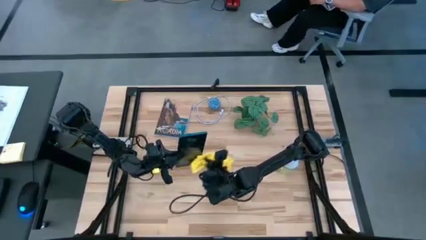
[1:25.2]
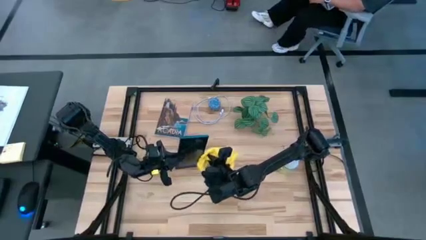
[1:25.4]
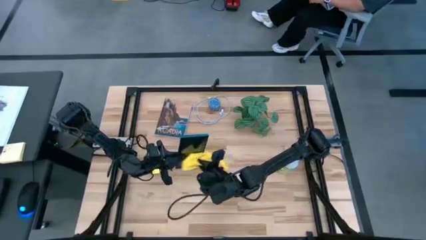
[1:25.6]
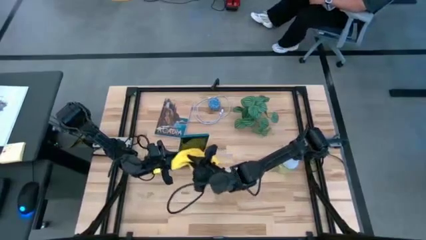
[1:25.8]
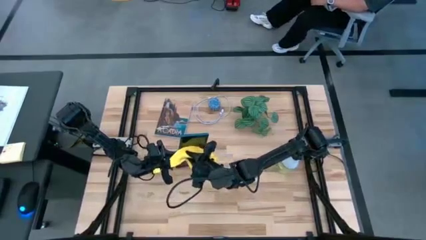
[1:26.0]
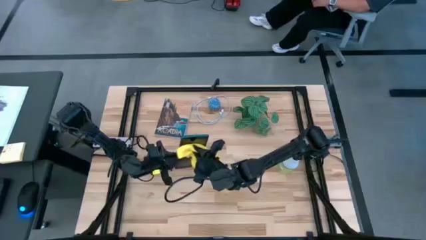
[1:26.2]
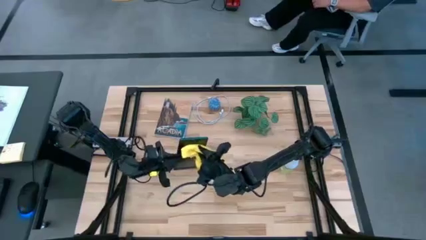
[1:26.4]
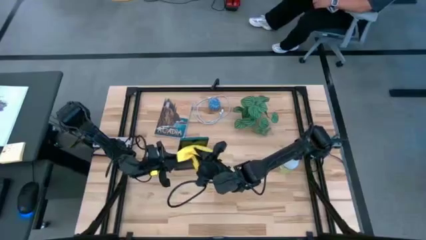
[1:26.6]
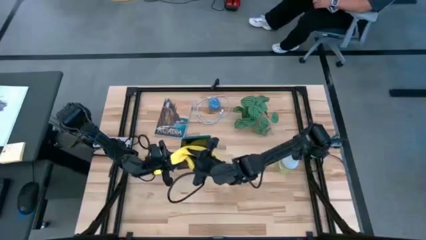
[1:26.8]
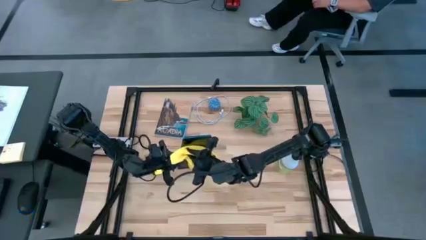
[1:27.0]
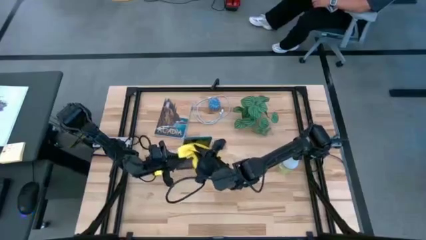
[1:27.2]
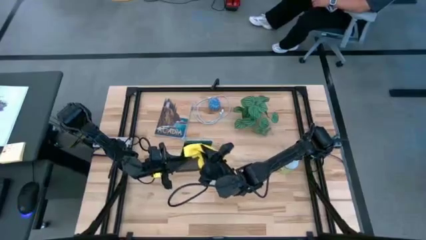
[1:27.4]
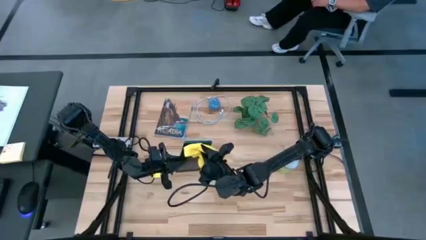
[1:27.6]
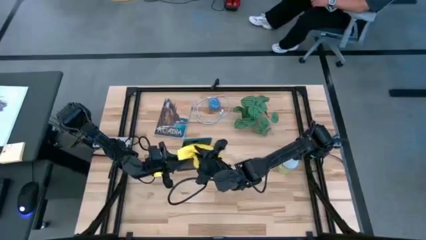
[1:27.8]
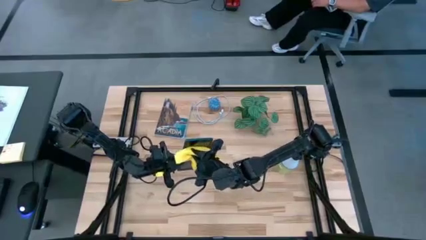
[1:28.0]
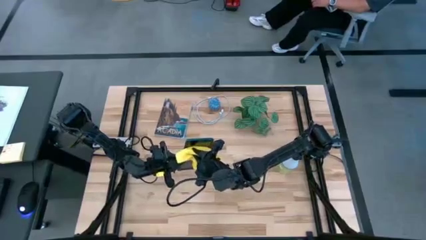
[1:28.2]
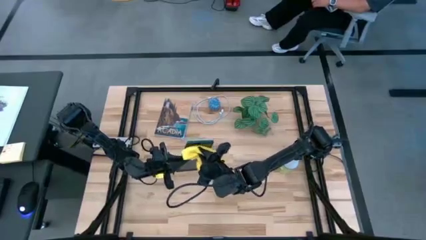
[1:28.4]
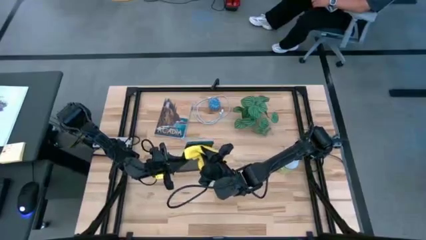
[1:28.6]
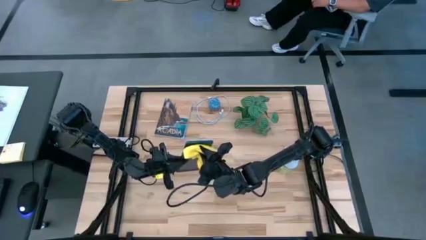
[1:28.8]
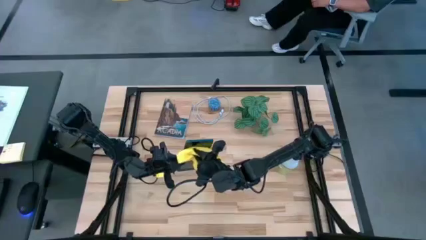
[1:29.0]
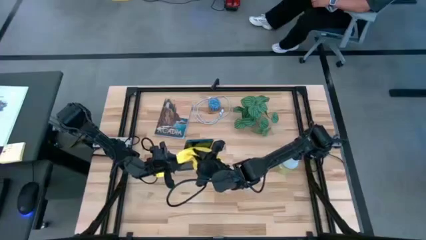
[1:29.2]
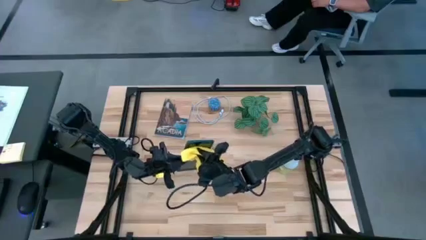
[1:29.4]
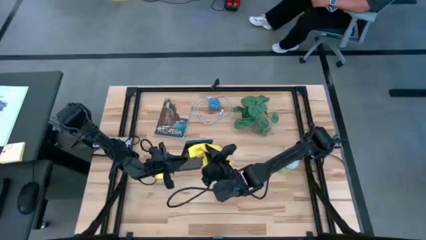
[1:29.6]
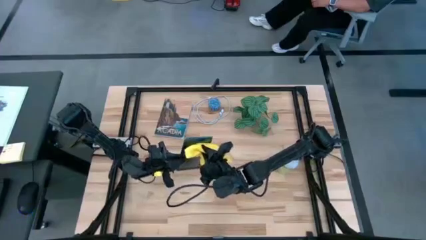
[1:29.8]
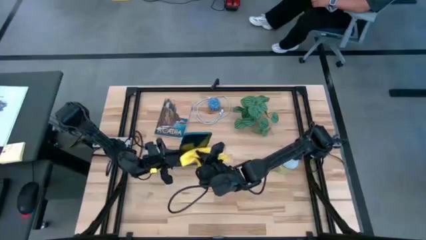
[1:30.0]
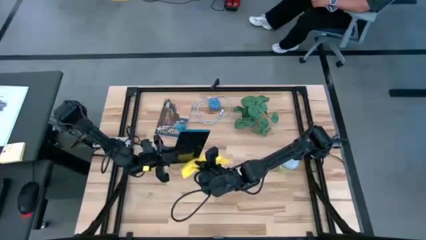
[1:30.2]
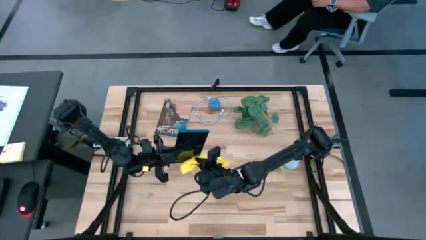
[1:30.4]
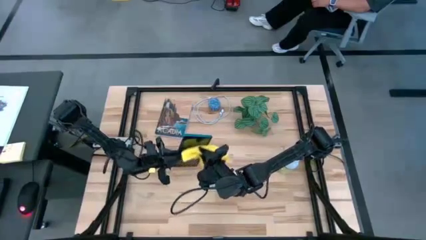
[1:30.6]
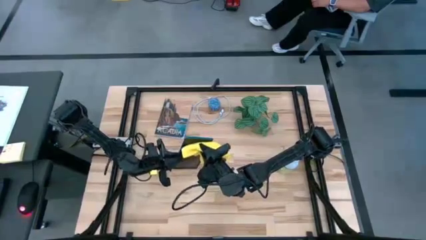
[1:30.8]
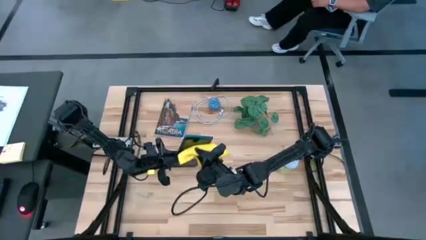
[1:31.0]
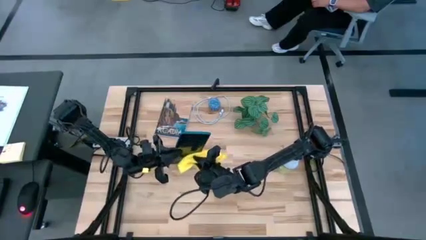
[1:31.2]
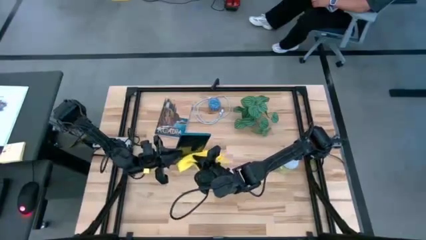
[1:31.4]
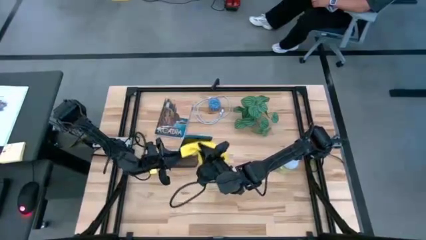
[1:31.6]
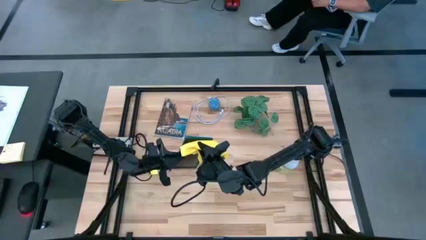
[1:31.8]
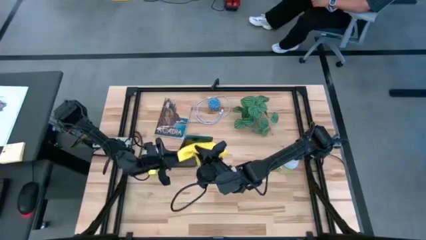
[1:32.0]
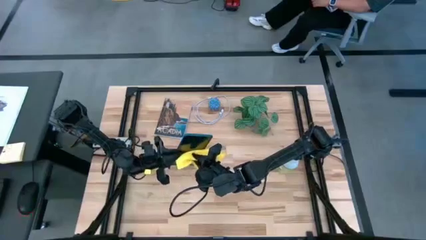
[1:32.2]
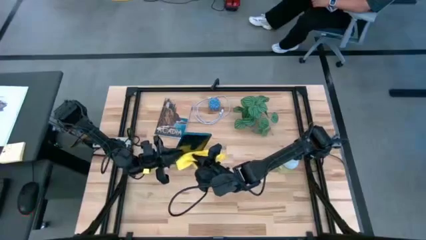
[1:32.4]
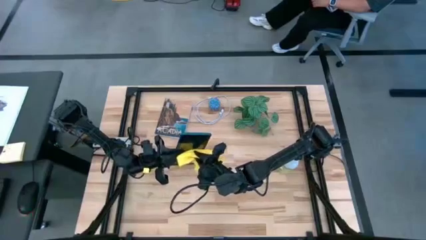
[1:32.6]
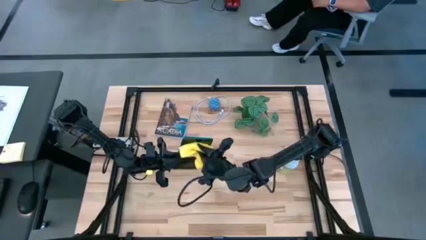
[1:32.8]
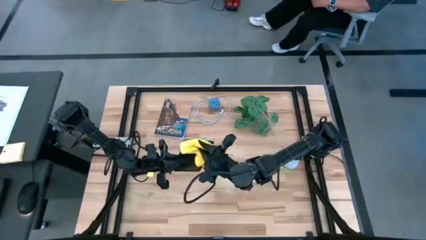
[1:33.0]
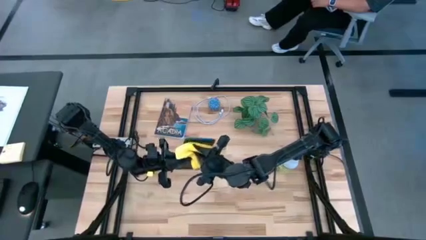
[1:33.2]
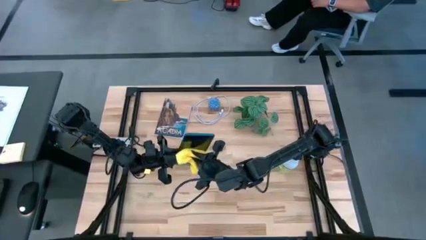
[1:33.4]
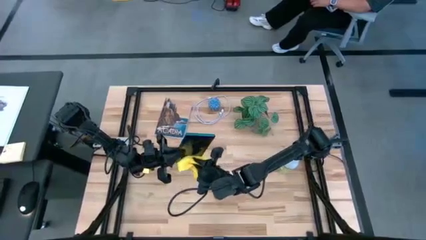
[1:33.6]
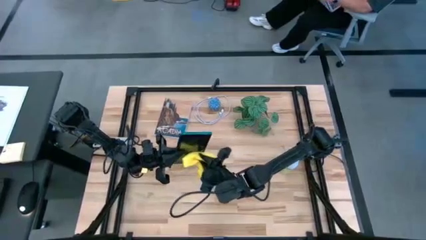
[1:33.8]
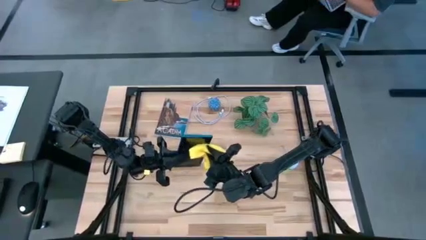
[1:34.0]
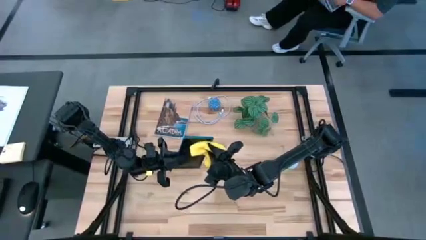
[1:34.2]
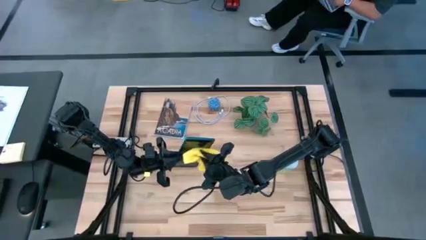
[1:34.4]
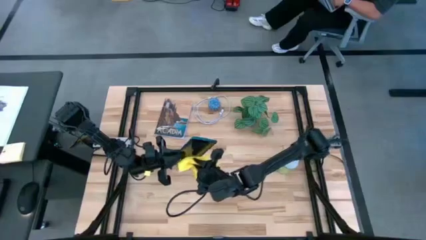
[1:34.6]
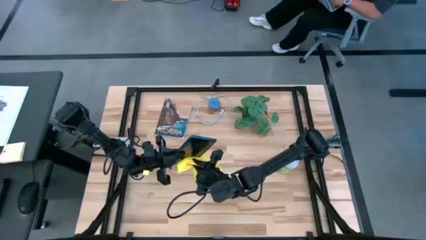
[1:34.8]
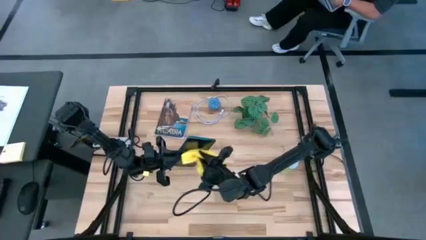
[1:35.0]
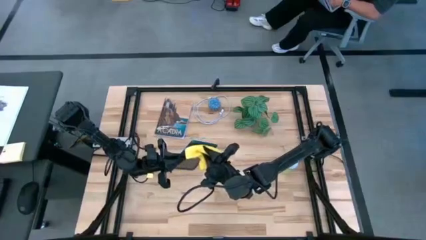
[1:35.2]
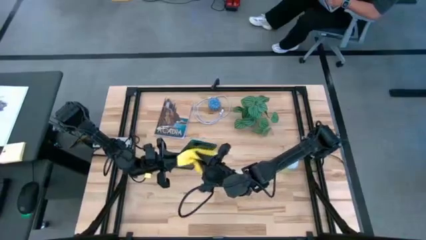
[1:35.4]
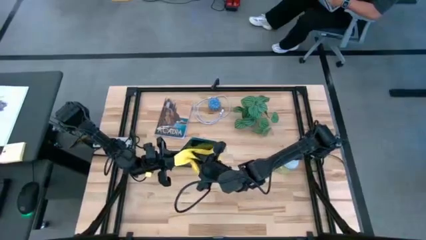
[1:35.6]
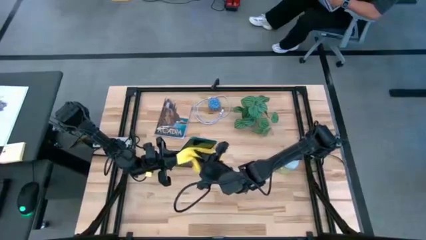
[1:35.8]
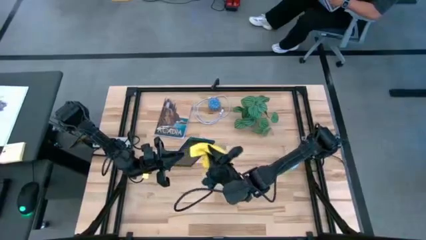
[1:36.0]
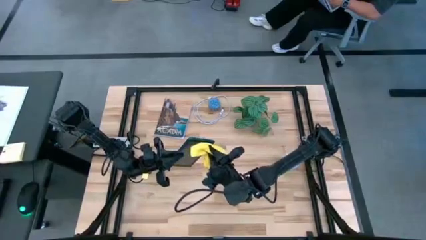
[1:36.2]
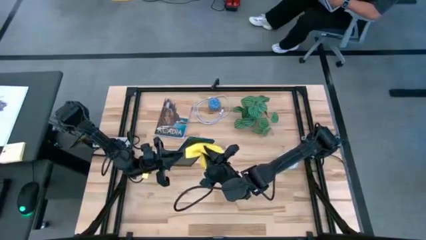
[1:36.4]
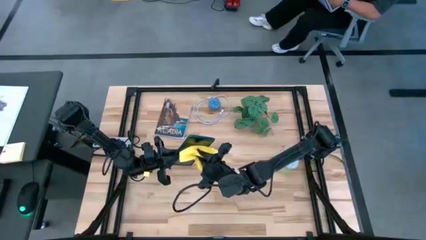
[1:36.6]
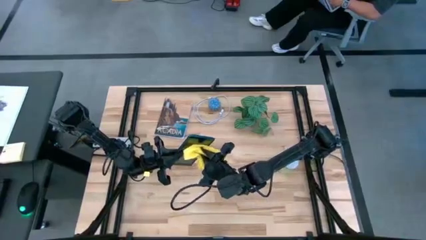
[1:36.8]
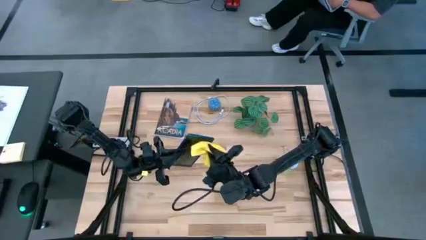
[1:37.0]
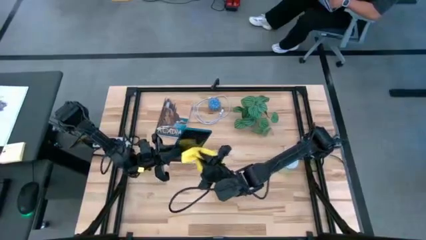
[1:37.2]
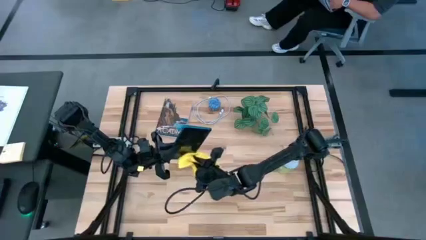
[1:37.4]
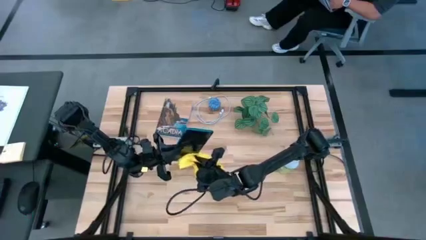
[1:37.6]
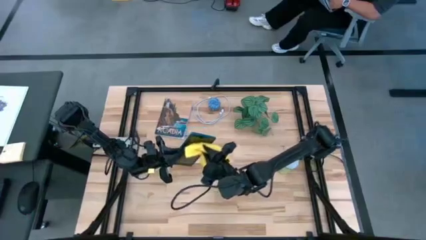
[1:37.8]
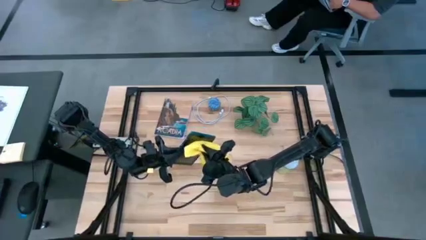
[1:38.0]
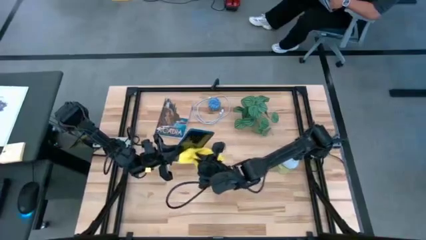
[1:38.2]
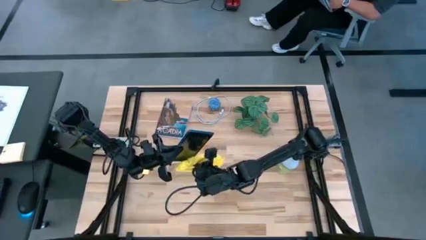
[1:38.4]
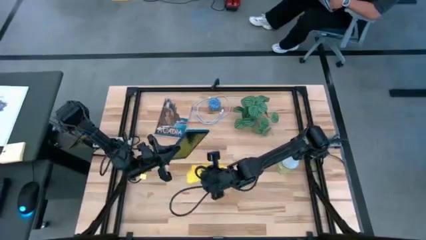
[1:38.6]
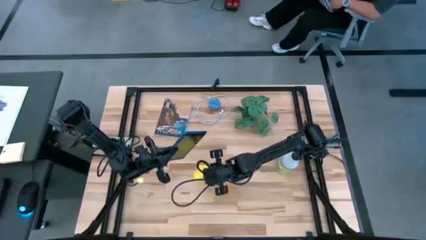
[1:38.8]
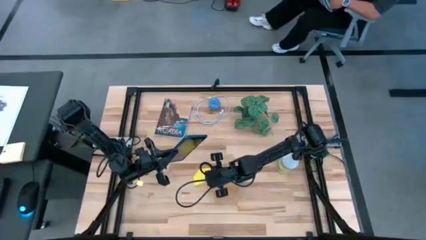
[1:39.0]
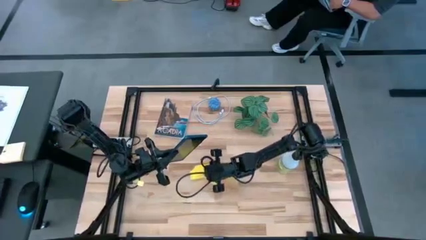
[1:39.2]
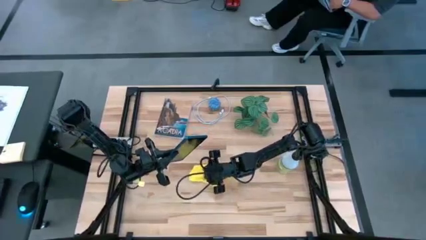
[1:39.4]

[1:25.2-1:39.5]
Task: Clean tablet
Wipe the front of the tablet using microfiber towel
